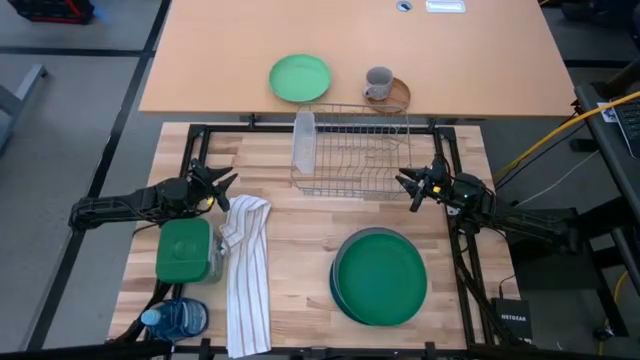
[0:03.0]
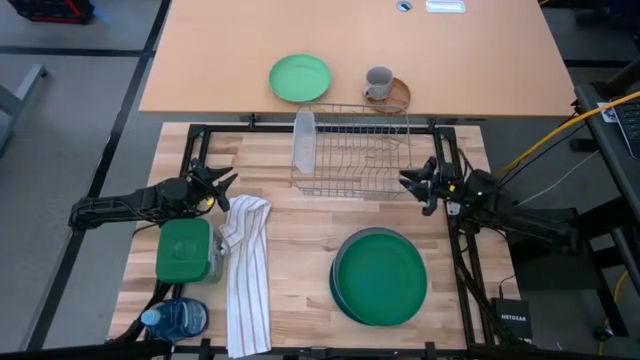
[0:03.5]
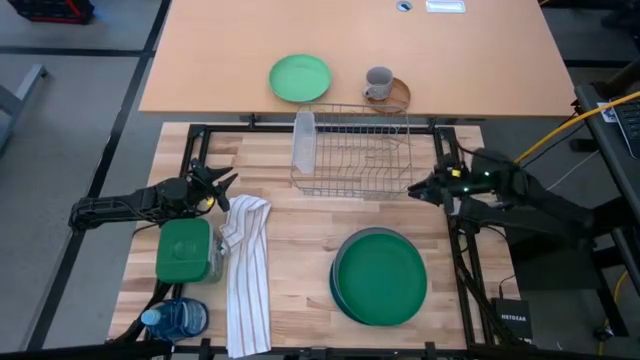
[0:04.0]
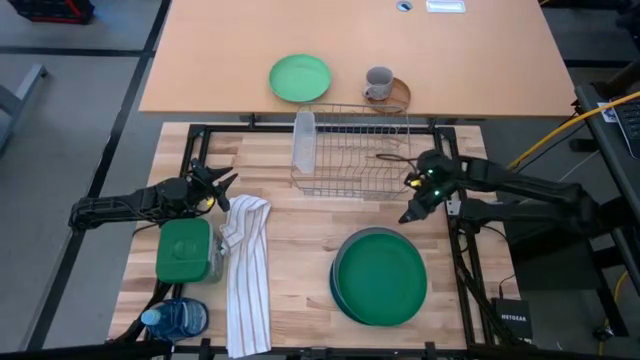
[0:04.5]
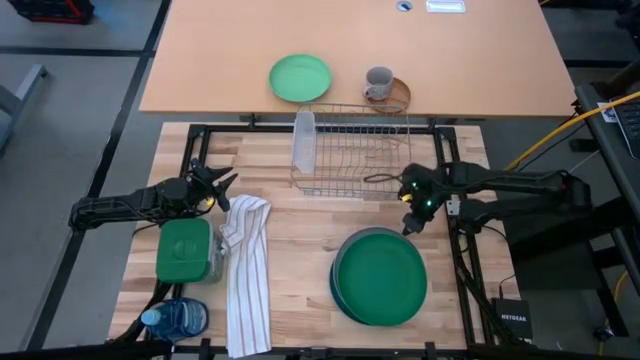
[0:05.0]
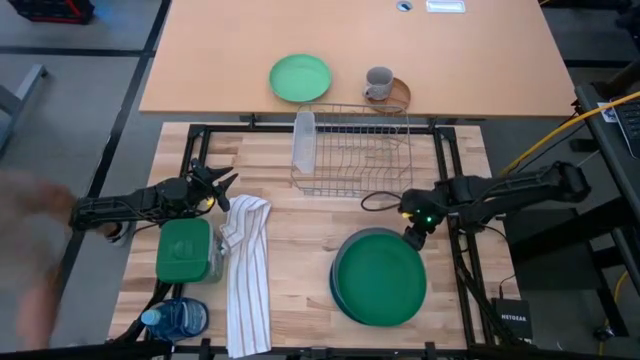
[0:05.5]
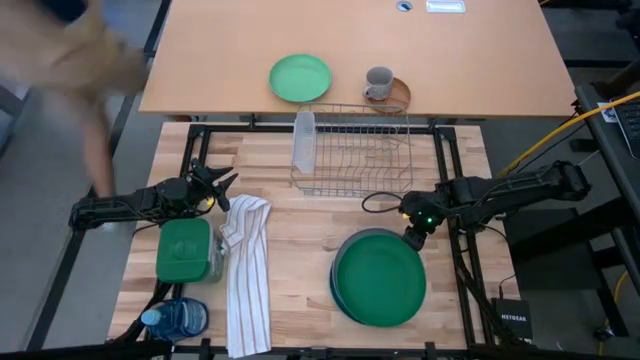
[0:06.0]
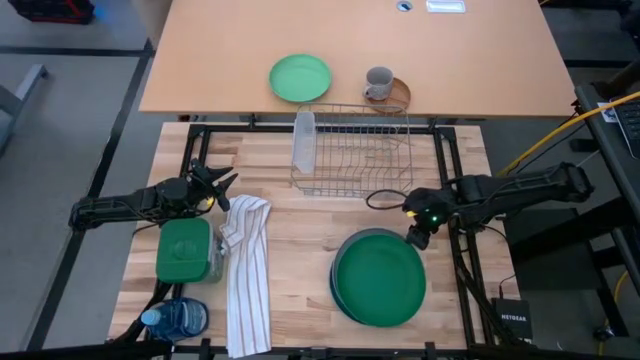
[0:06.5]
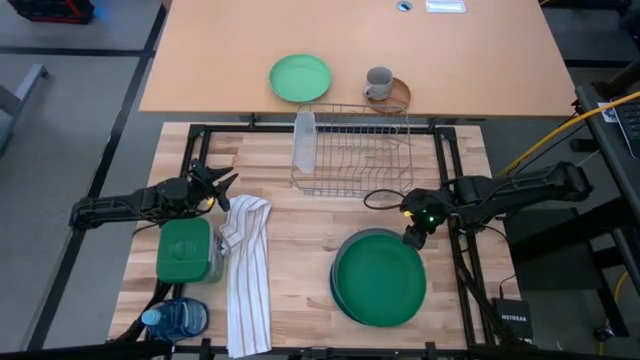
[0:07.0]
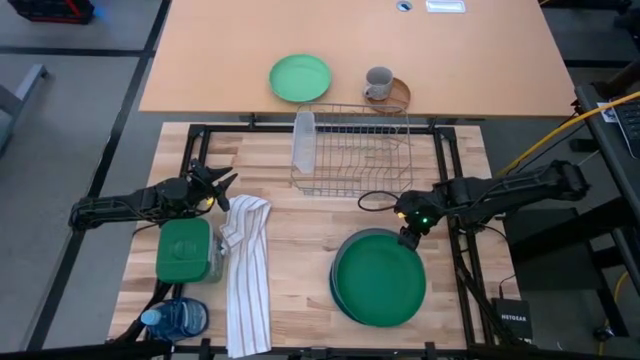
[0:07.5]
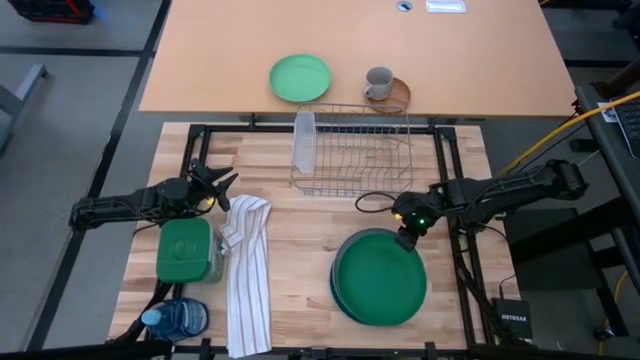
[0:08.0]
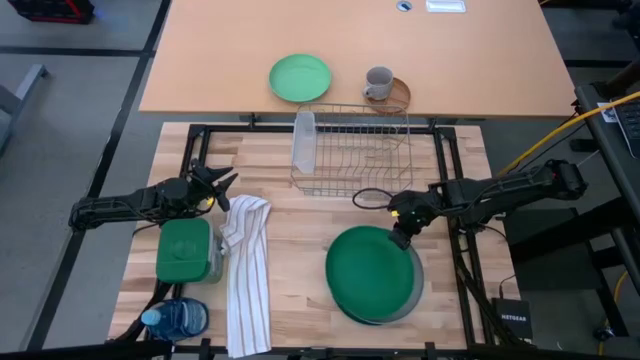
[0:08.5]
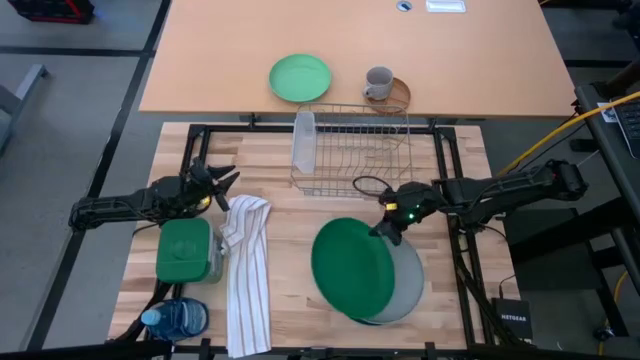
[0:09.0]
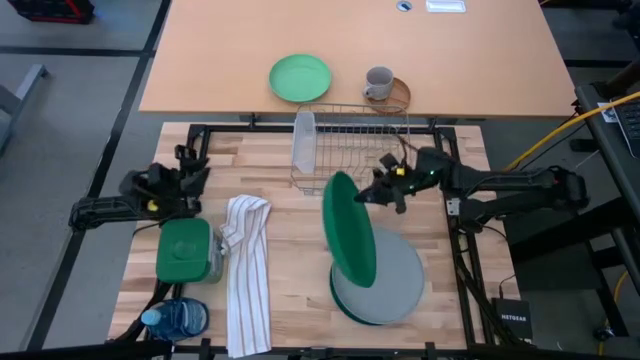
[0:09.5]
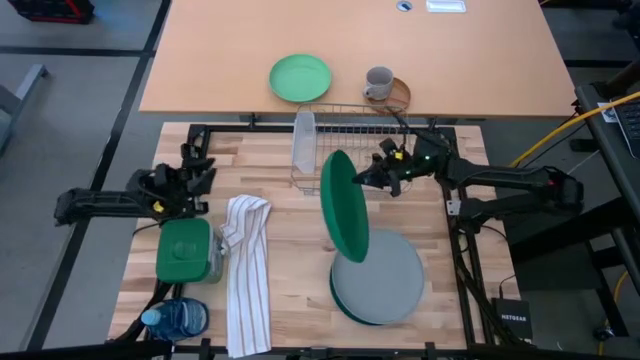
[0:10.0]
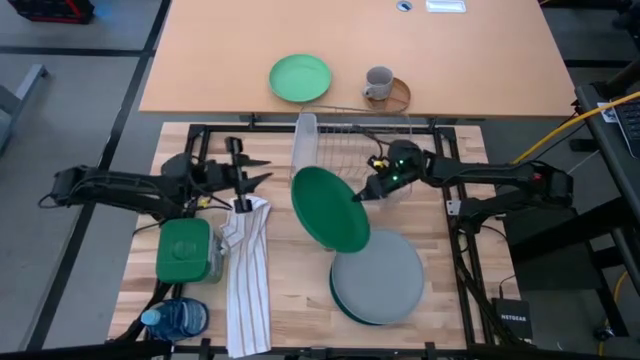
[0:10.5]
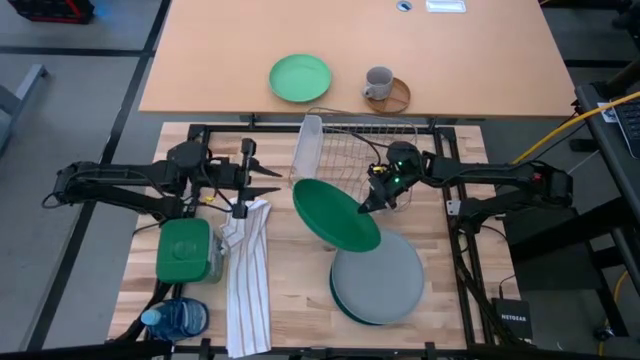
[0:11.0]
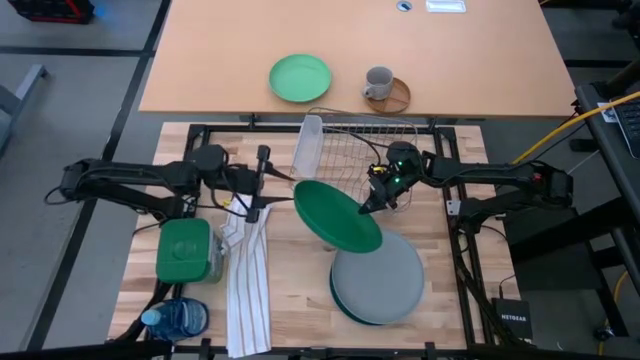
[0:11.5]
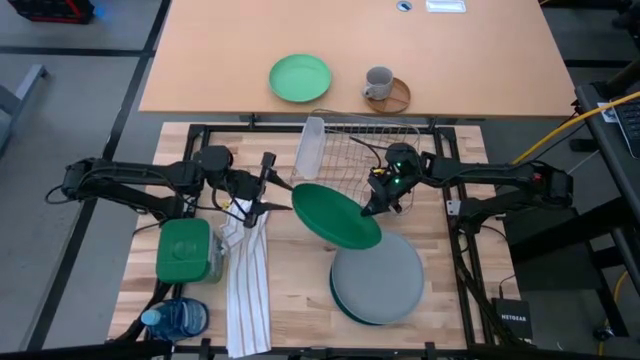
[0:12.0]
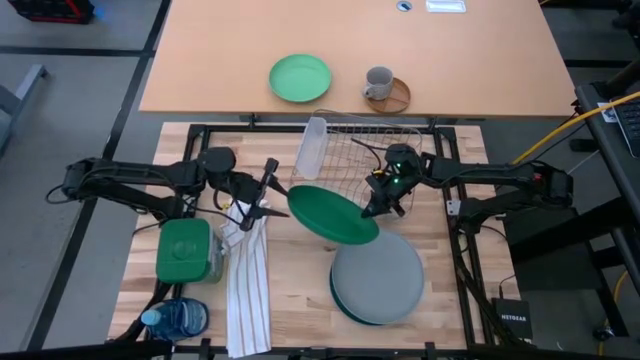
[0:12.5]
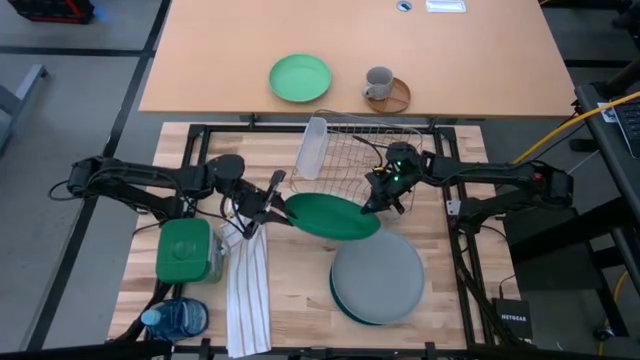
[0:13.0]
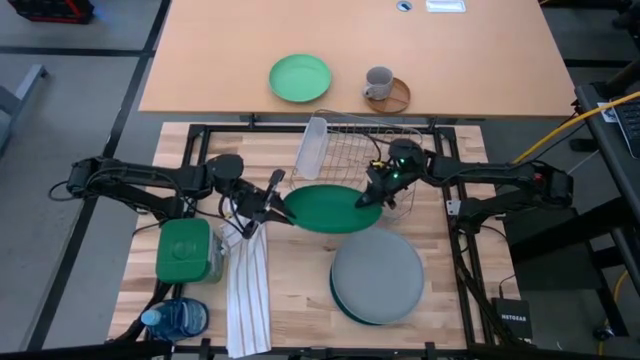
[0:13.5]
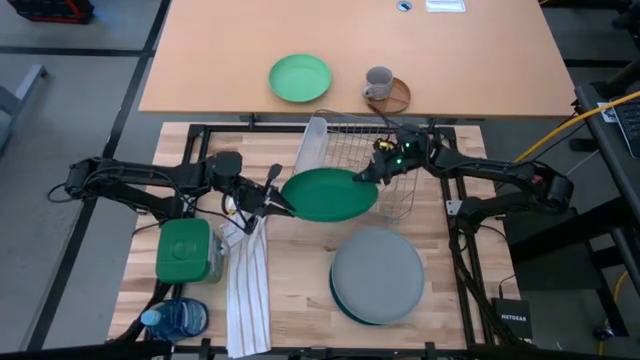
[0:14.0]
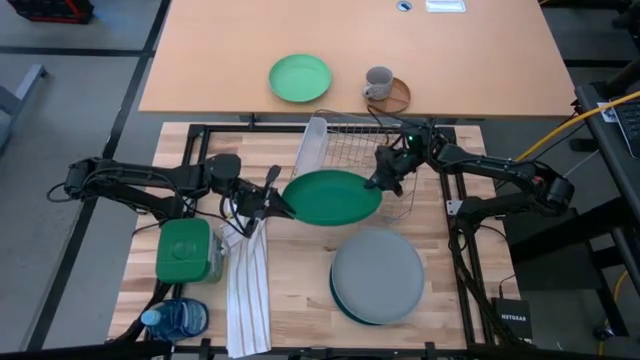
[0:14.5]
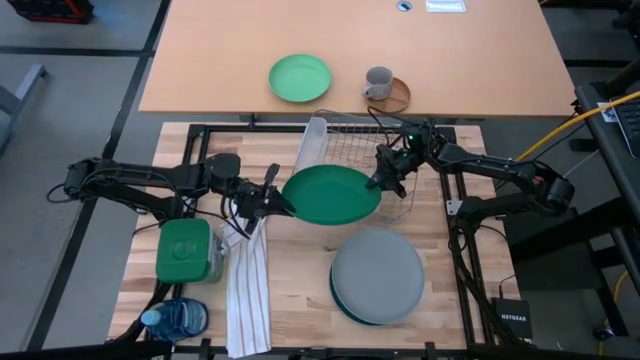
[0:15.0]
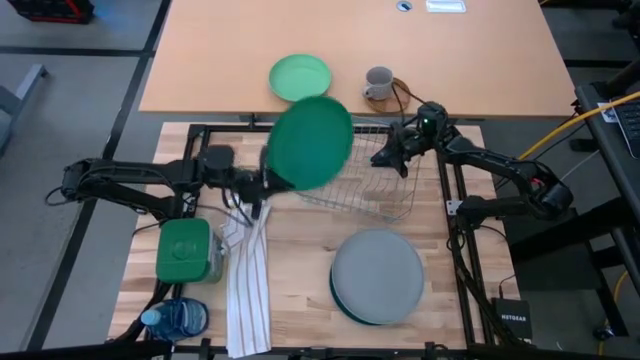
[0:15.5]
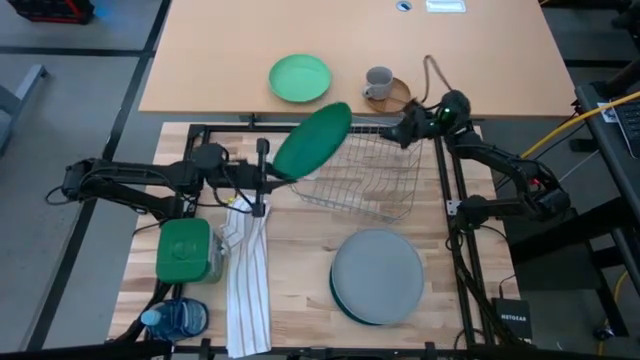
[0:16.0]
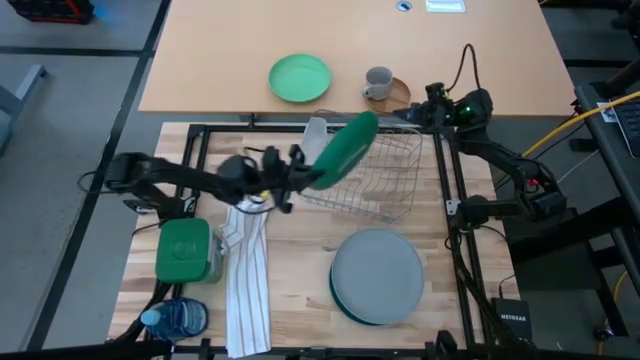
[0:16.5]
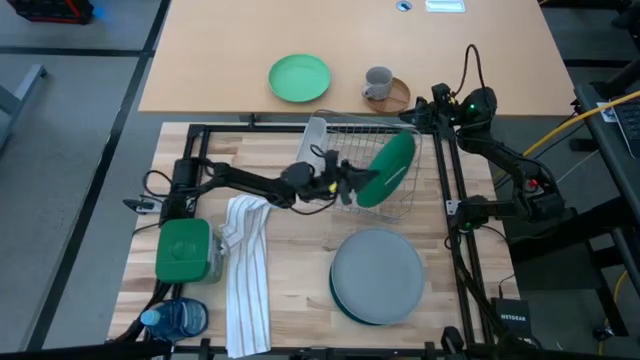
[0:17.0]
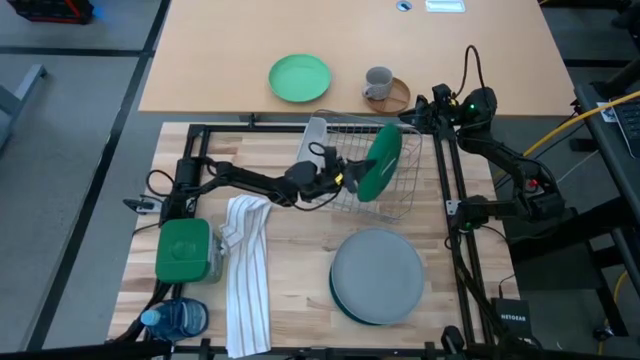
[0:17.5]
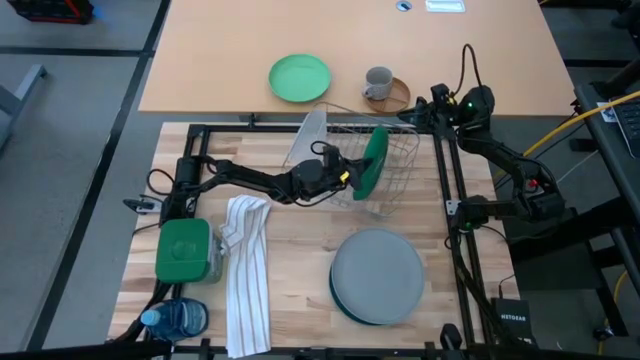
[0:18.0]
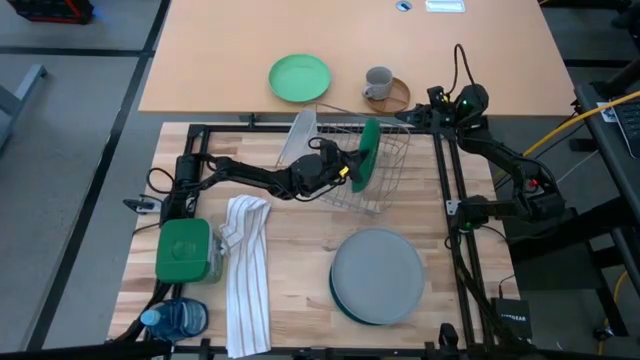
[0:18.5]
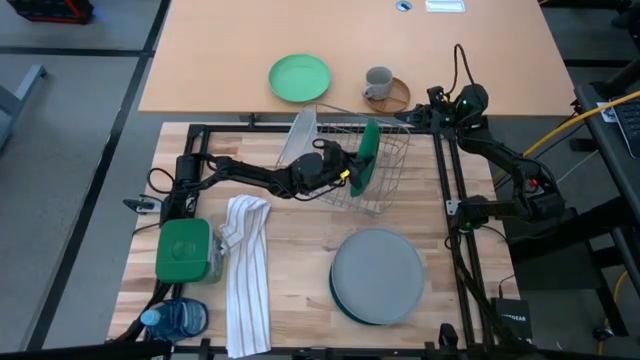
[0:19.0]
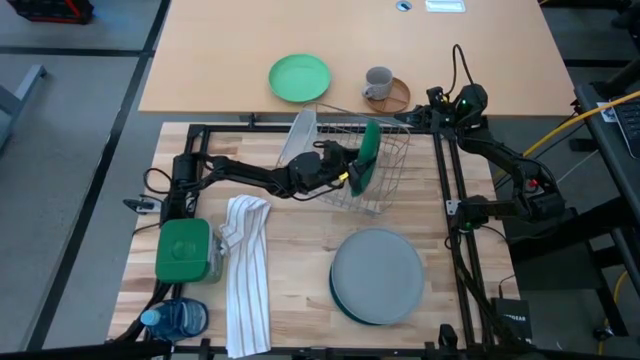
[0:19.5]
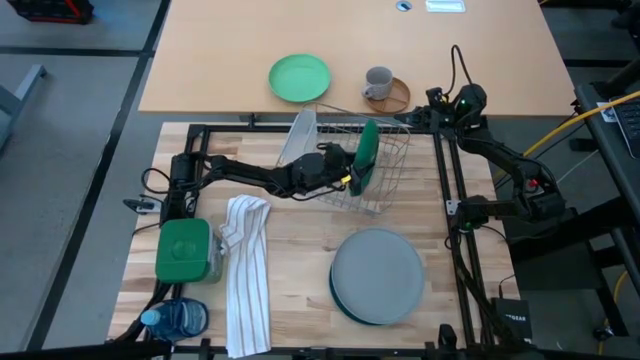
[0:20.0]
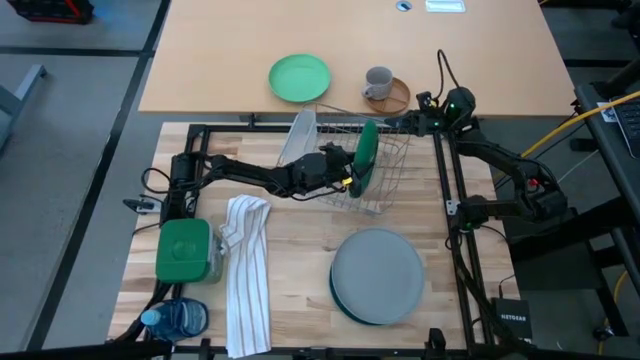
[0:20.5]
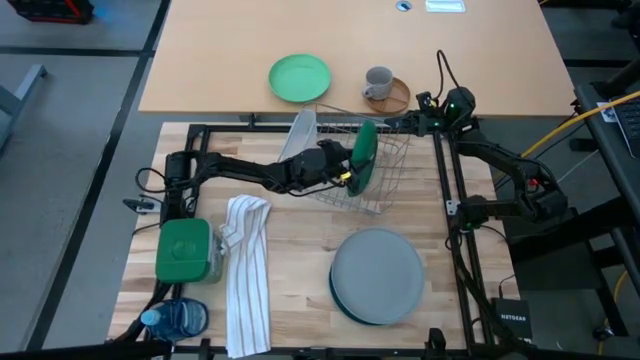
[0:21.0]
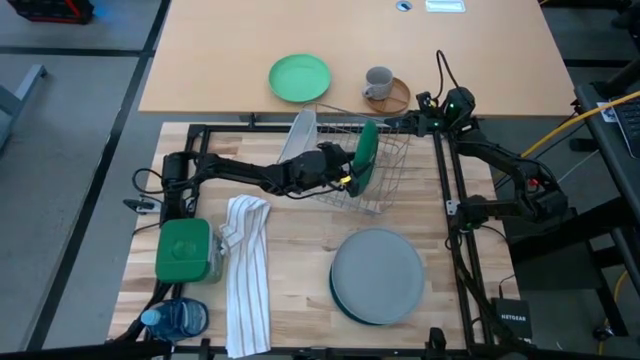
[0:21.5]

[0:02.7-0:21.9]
Task: Sort dishes
Put the dark green plate in the dish rack
